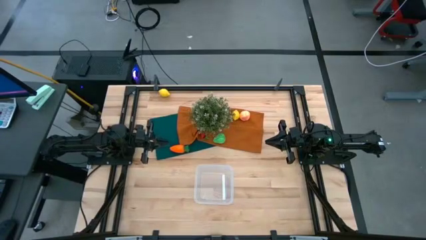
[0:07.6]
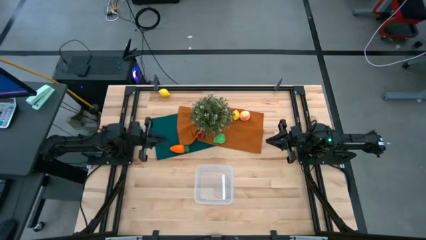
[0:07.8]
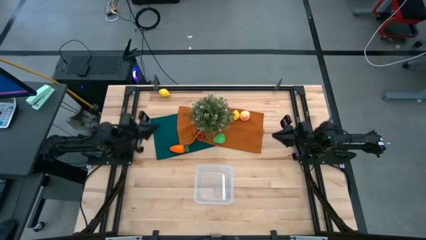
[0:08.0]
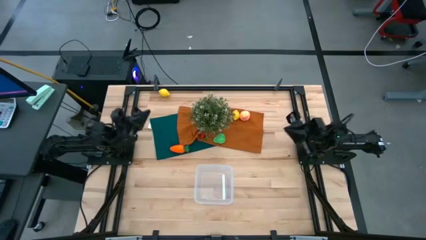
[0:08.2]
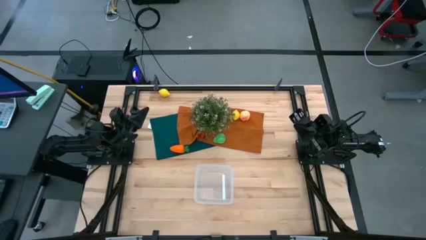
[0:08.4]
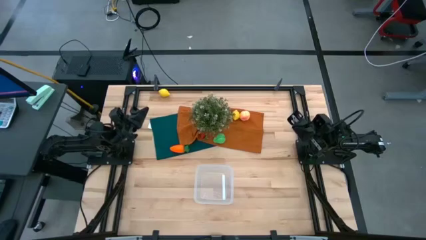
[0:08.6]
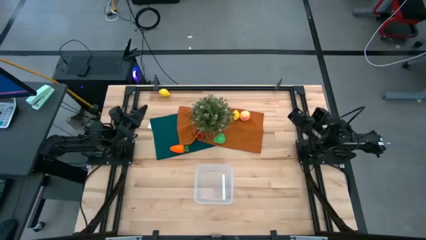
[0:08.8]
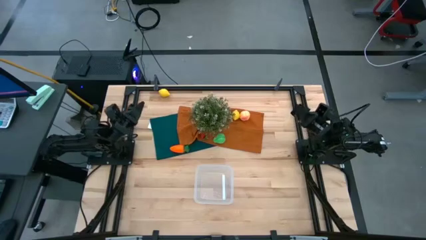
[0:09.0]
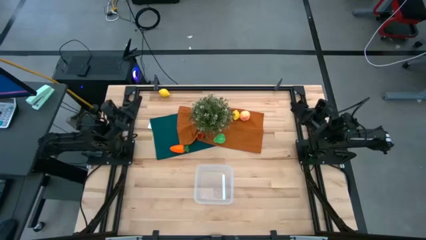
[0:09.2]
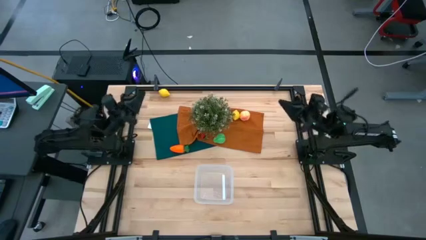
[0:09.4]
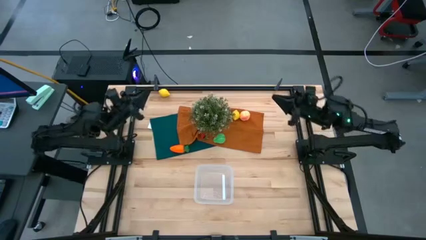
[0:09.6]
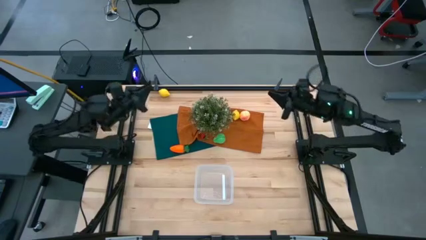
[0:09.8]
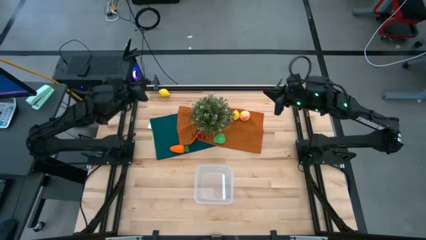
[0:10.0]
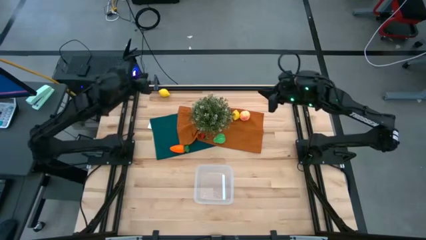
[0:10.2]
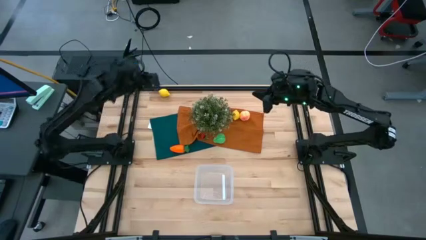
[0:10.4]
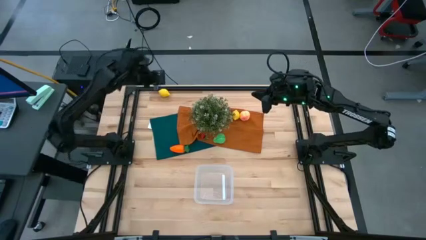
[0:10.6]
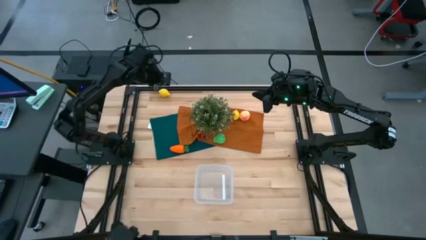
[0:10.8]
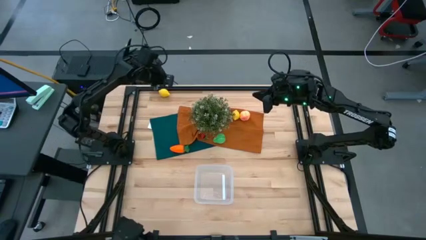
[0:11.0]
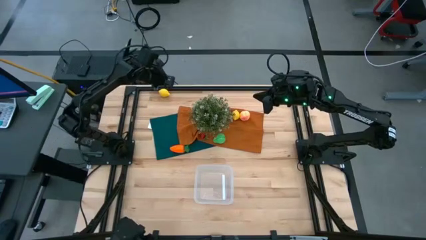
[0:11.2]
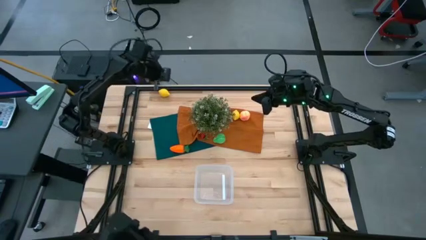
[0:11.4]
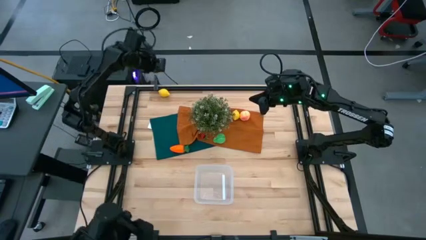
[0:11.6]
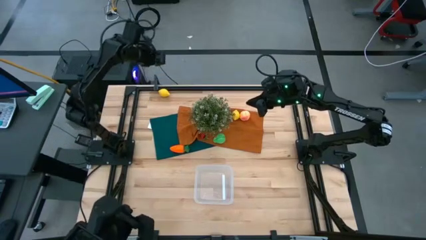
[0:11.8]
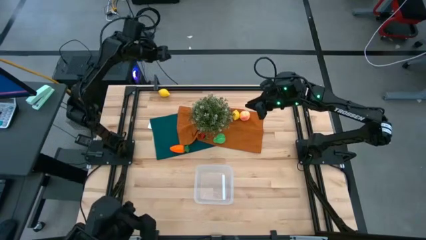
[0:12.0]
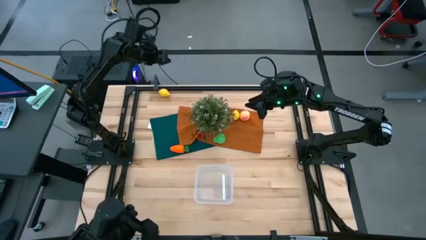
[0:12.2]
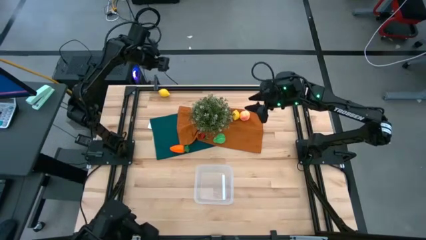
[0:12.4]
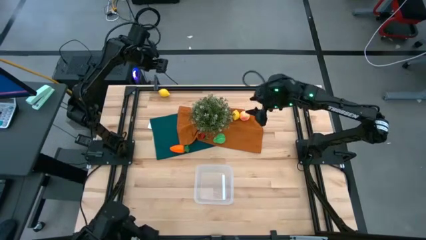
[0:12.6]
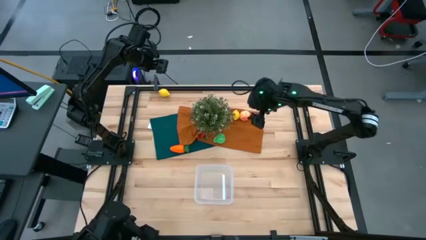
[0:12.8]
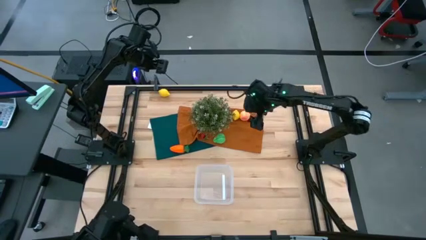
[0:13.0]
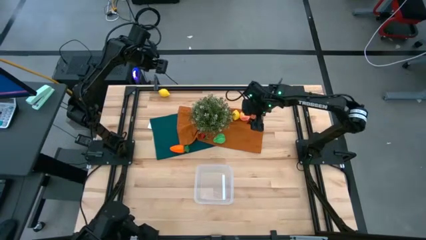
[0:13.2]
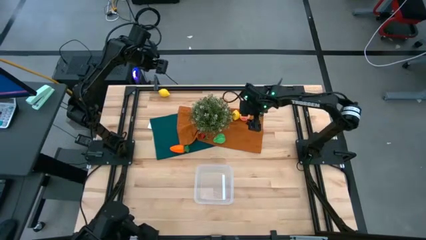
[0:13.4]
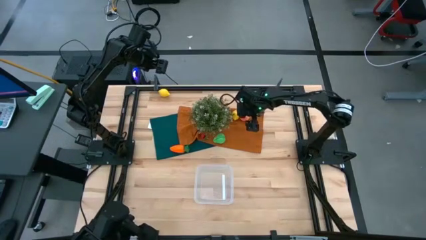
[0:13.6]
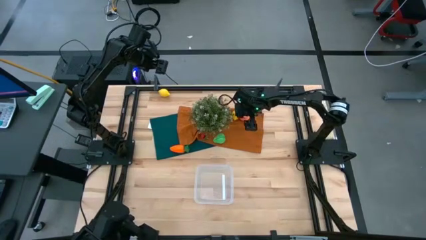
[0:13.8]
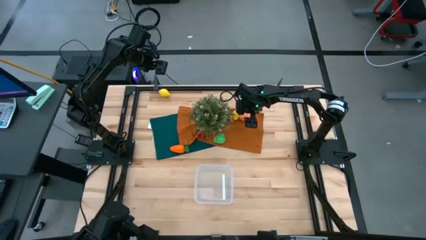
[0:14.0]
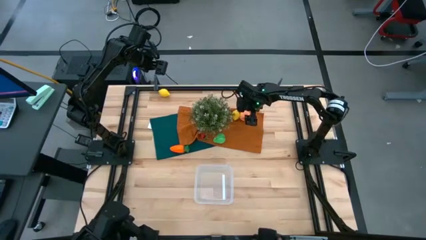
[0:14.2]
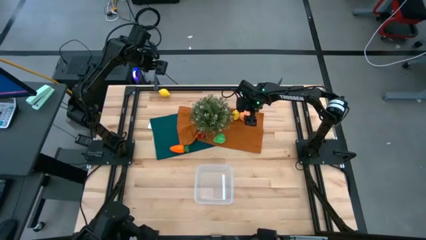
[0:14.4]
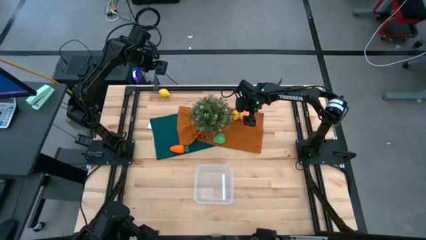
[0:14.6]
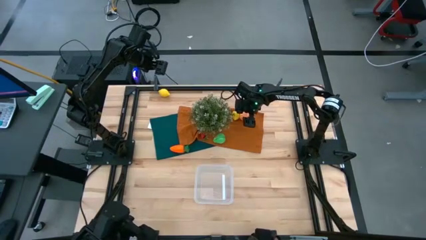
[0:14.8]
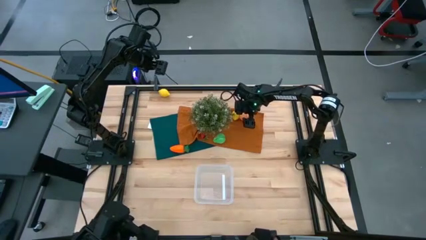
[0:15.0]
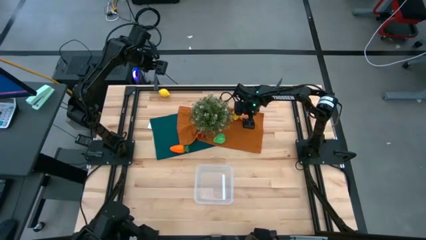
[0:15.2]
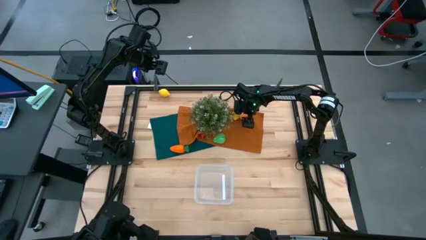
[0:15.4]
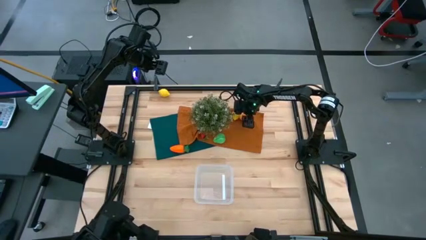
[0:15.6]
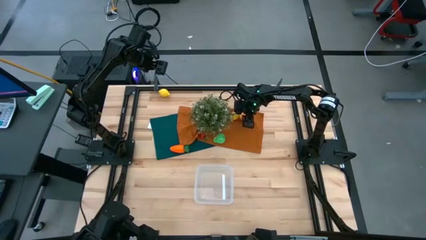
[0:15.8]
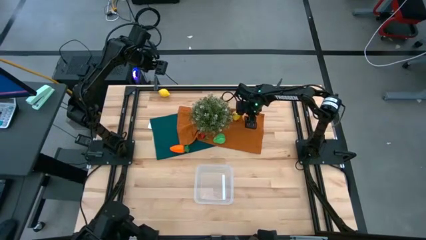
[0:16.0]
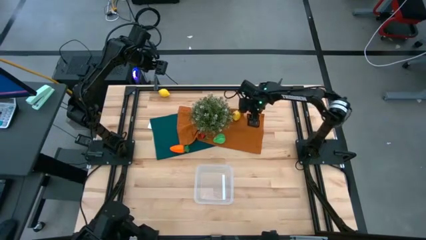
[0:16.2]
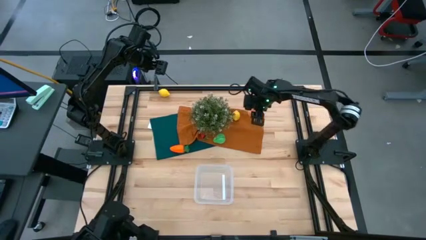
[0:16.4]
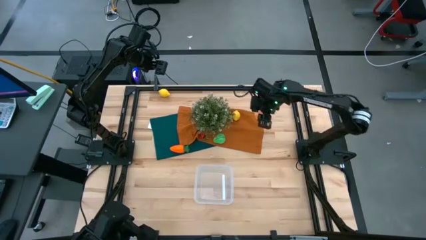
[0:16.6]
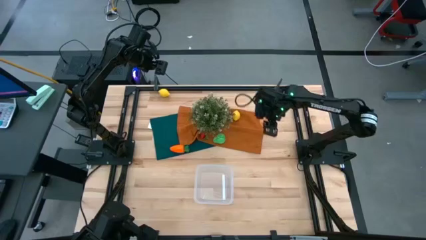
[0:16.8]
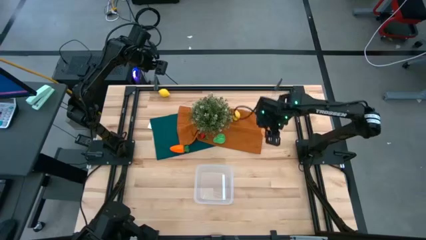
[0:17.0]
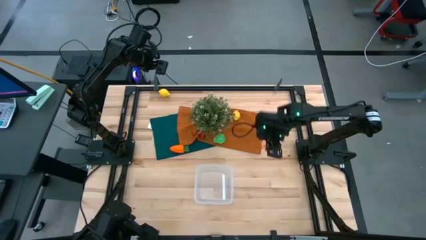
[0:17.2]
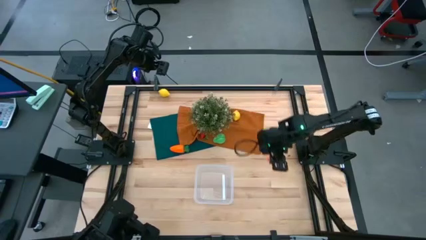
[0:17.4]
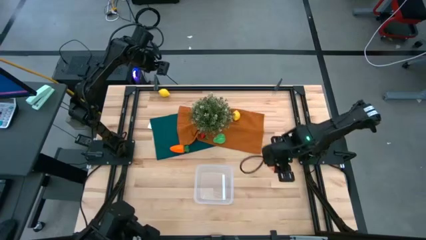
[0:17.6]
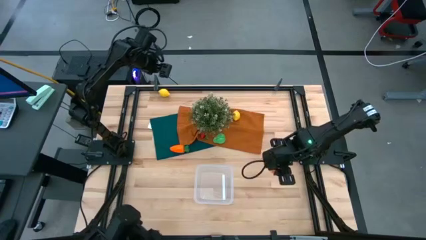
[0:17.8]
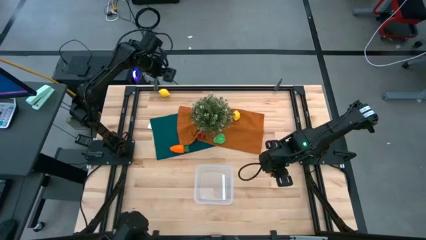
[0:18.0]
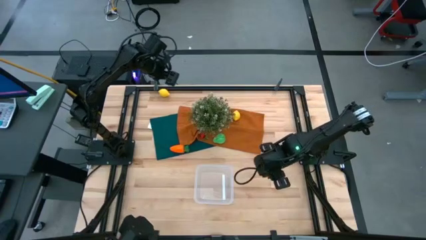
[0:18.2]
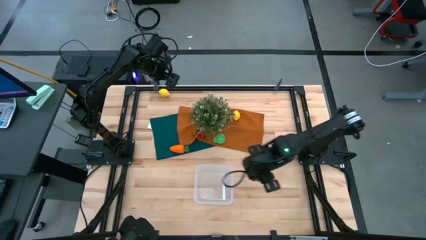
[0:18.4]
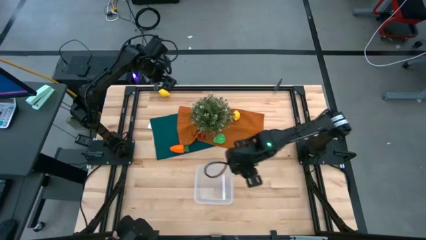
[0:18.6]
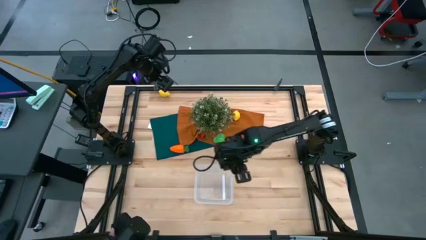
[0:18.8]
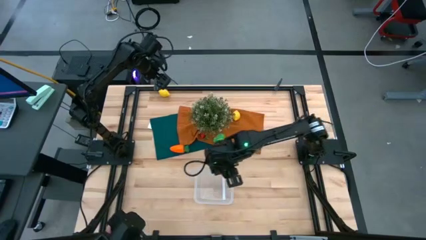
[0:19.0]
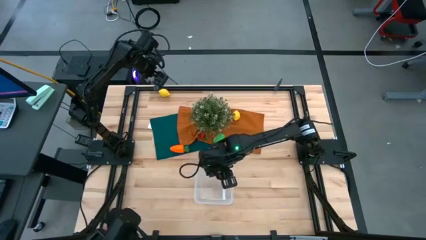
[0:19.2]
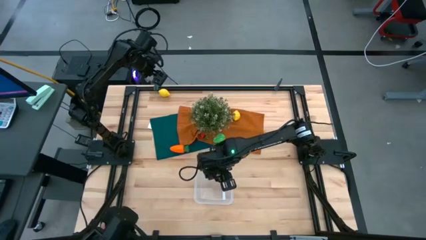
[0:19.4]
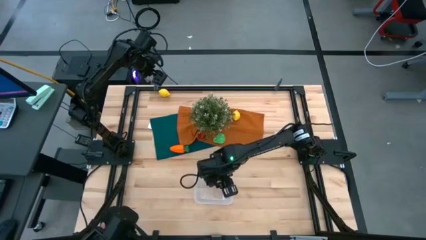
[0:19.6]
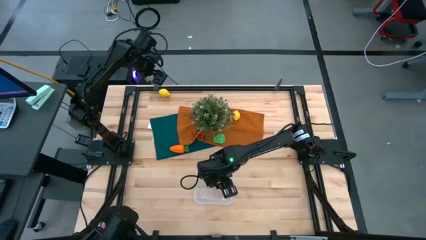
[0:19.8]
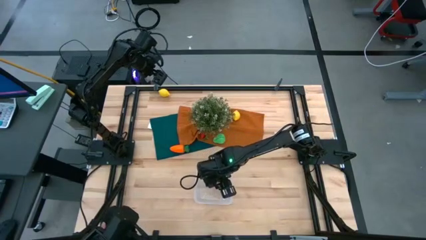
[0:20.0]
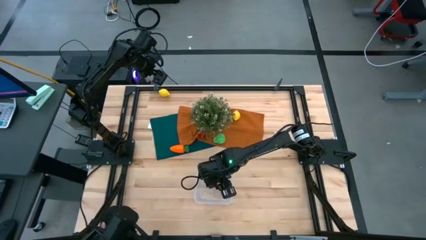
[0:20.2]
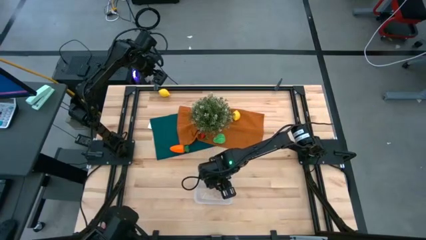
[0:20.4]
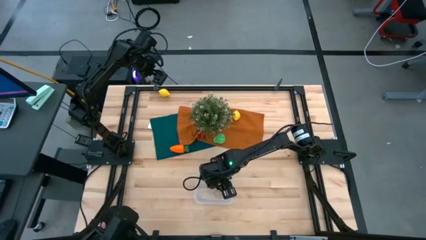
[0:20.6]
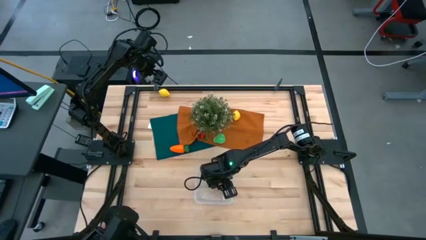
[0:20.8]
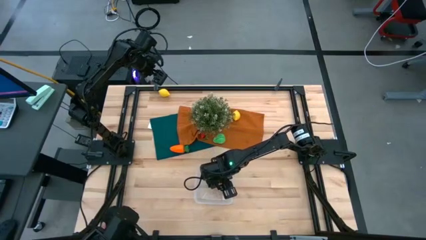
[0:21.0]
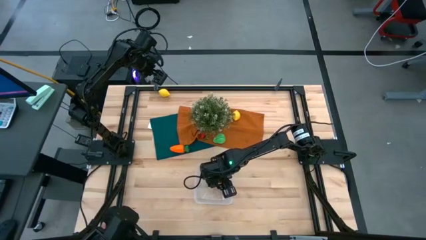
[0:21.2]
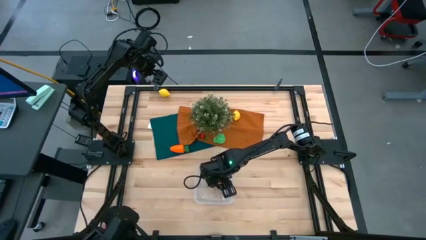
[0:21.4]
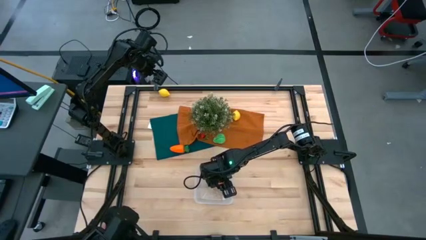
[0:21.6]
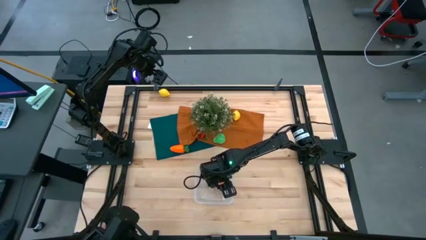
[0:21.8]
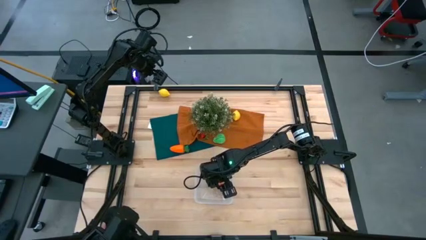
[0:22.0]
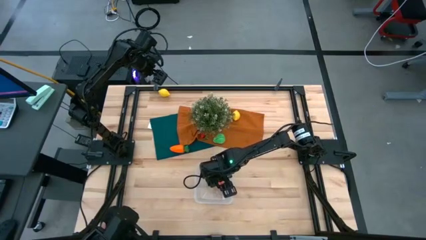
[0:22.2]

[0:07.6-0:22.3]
Task: Pick and placing Produce into tupperware
Put the peach into the transparent bin
